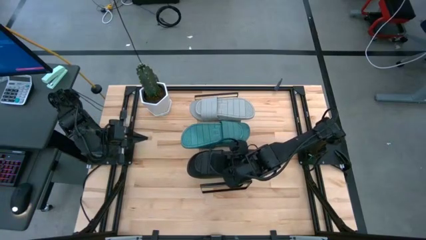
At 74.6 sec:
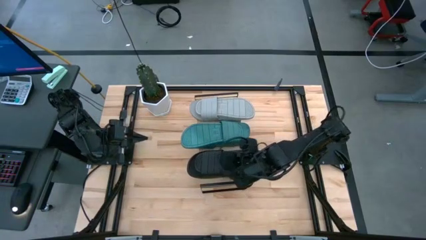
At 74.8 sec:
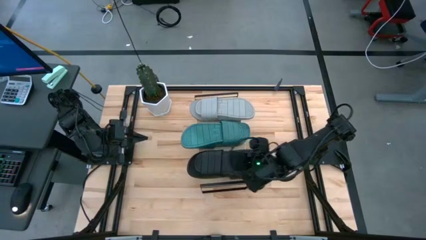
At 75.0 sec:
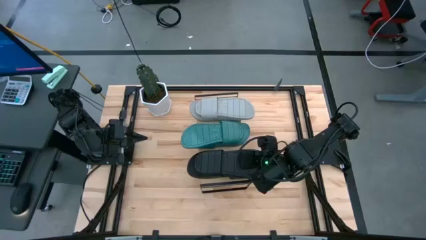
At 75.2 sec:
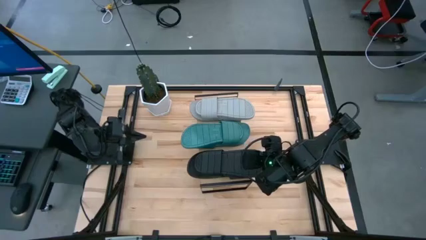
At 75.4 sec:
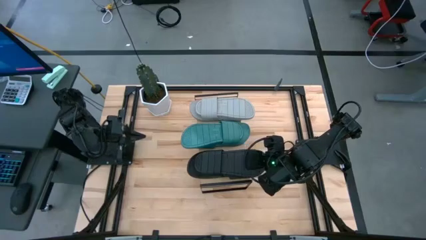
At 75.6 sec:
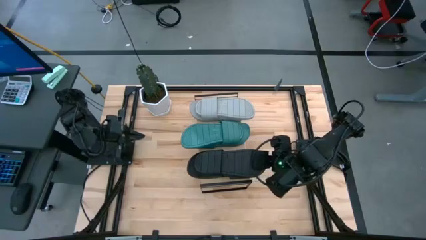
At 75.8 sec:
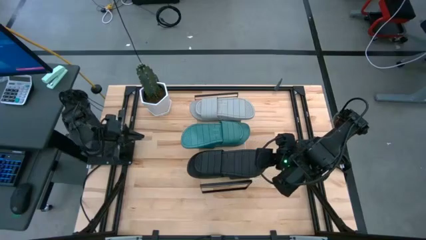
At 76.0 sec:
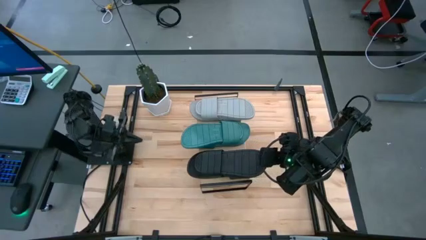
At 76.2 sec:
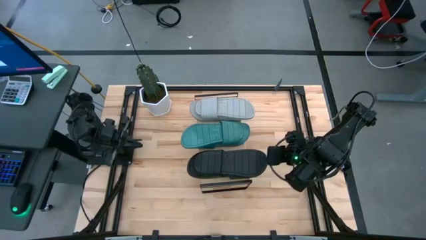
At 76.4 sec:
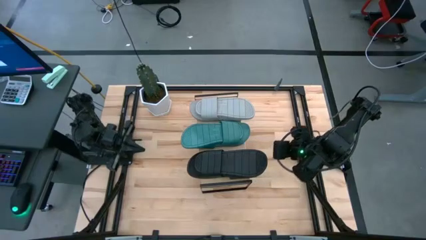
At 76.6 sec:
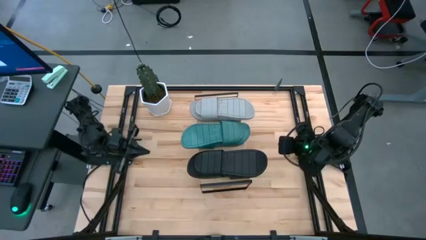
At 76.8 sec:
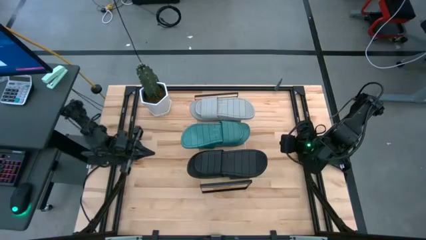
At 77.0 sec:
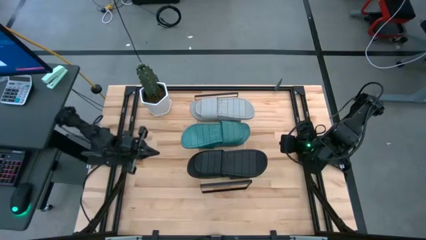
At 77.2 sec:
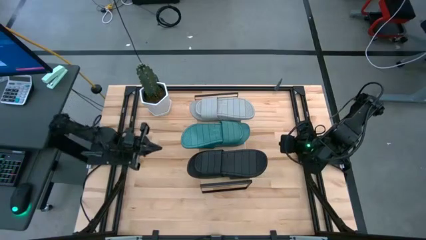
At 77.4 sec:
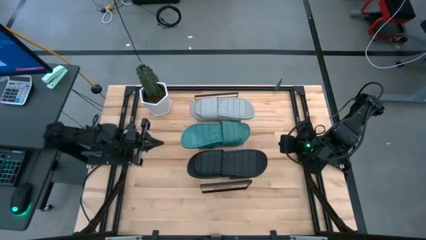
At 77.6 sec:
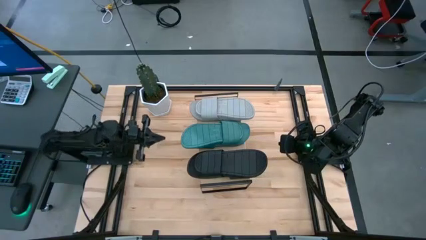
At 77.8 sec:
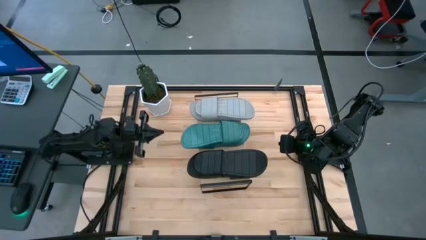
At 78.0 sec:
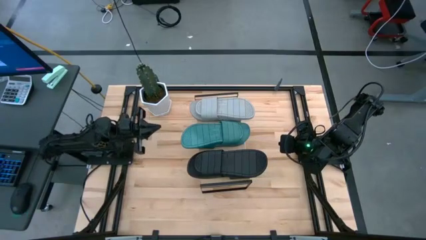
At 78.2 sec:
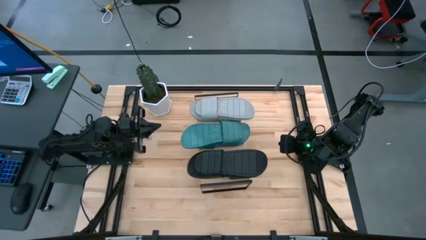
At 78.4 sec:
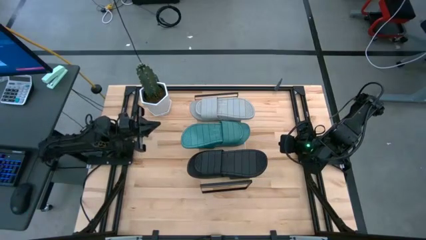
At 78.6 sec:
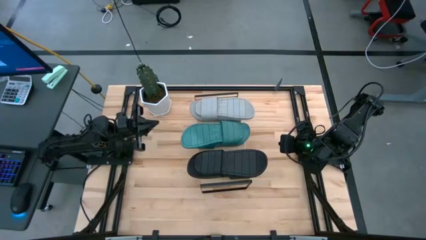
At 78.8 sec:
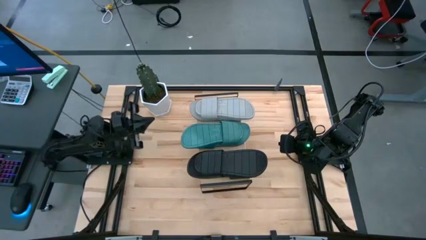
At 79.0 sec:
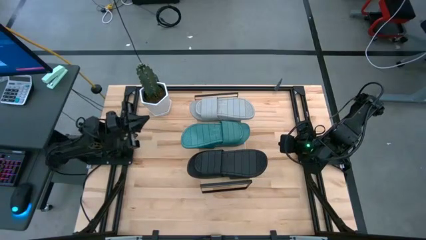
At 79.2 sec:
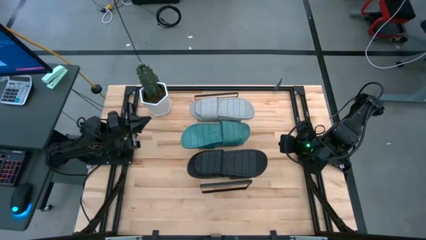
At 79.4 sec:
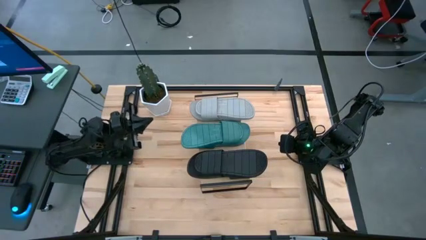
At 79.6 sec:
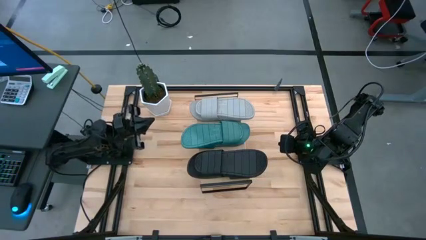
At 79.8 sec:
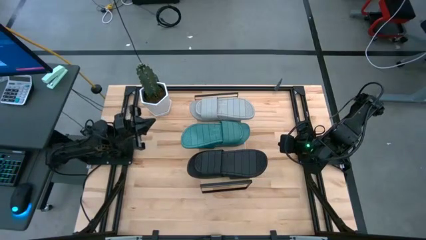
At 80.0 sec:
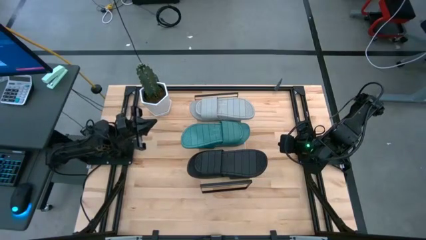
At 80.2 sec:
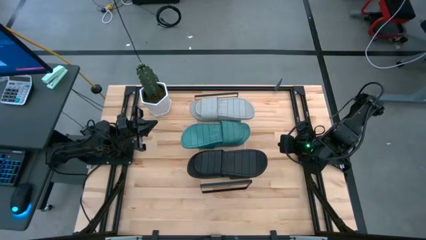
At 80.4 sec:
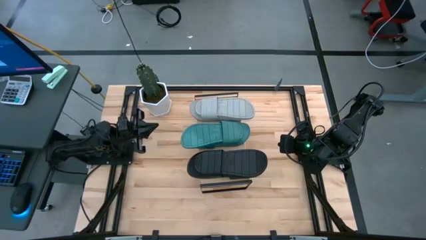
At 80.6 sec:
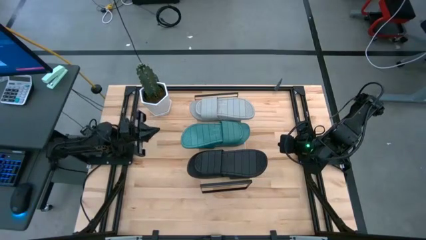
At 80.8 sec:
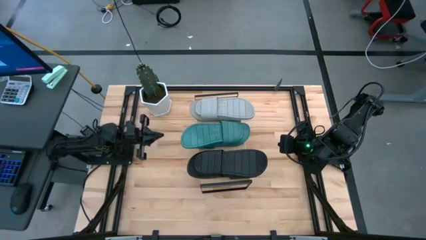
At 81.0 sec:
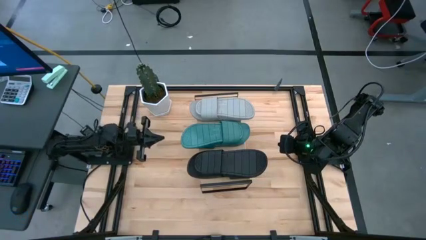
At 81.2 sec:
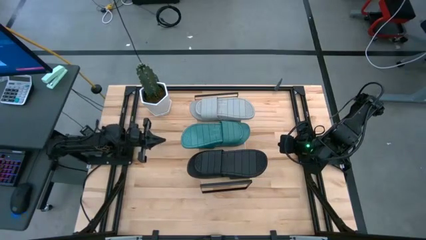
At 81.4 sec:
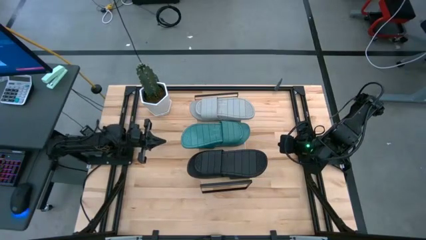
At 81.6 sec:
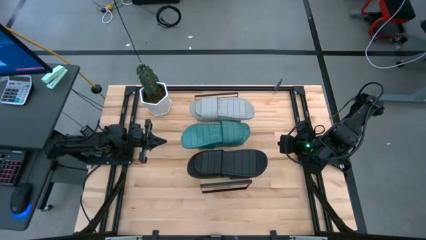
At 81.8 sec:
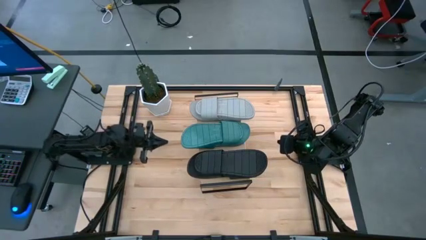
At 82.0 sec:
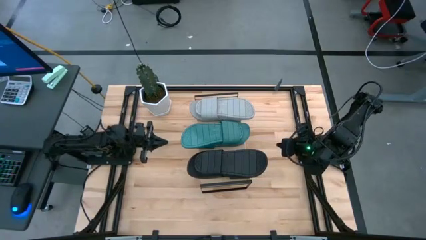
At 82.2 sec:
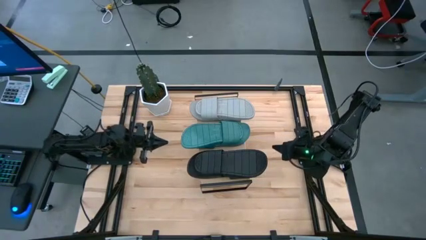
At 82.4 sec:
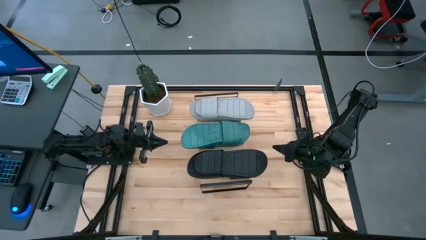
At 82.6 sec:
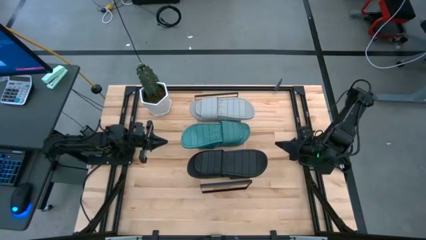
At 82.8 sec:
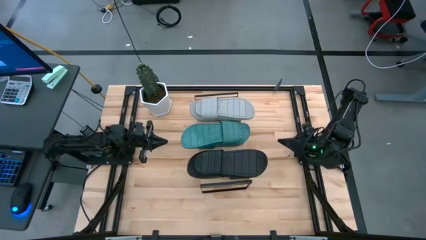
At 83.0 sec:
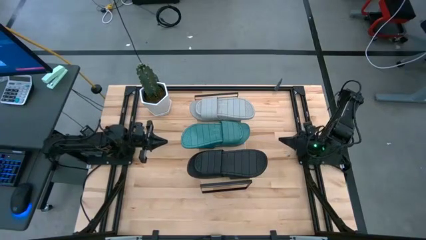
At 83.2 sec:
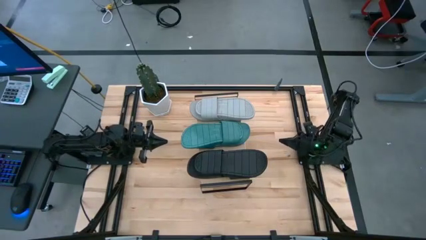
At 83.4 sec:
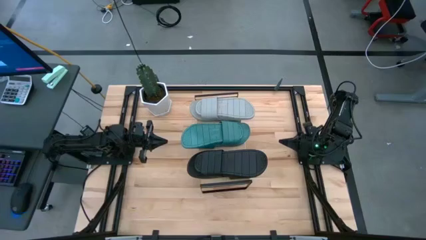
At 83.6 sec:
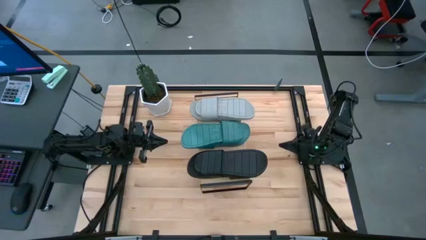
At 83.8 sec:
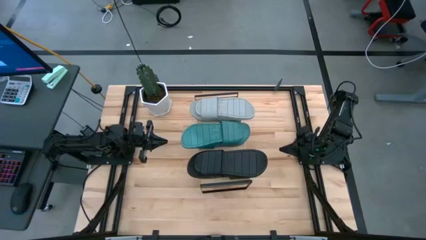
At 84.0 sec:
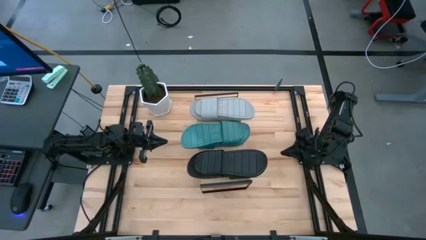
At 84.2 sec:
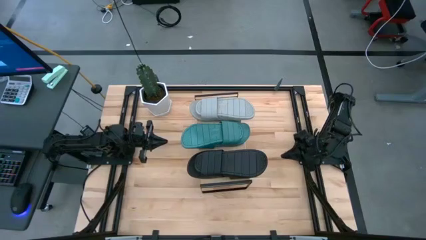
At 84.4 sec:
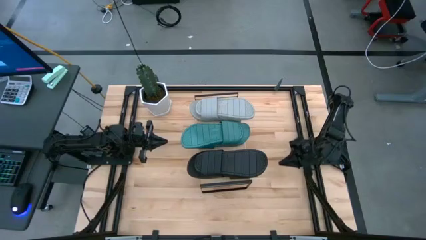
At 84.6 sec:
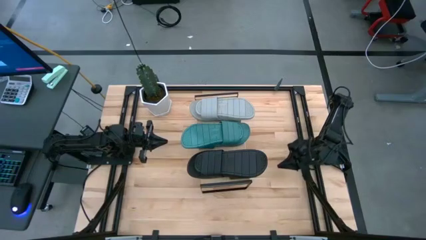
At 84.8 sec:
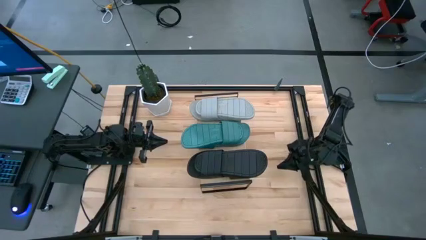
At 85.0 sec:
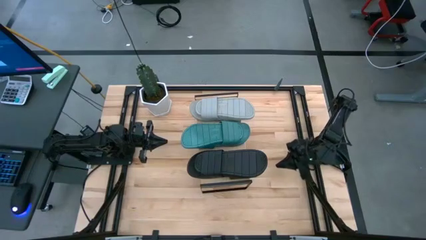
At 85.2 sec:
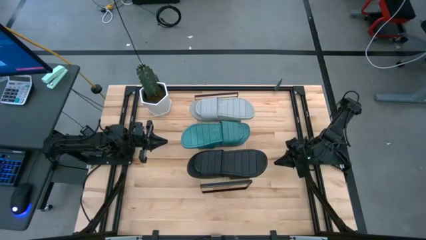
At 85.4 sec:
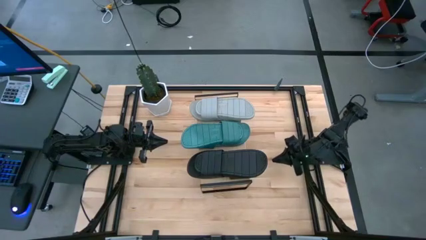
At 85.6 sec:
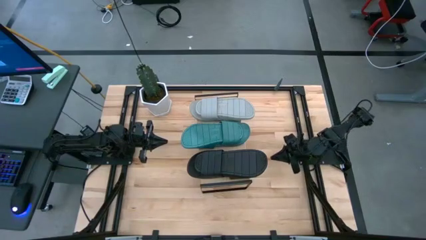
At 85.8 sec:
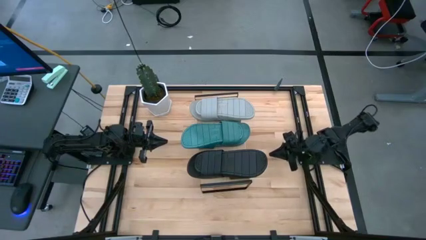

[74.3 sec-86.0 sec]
Task: Pick and place slippers onto the shelf
Return to Home Position

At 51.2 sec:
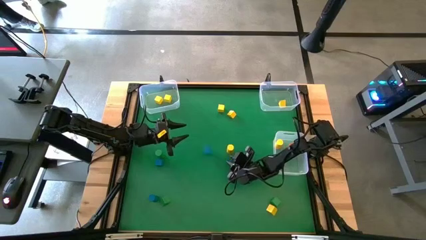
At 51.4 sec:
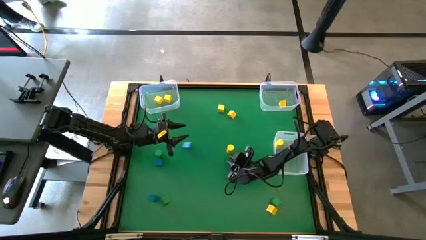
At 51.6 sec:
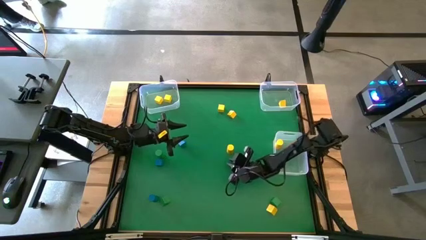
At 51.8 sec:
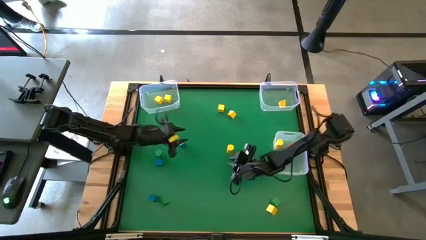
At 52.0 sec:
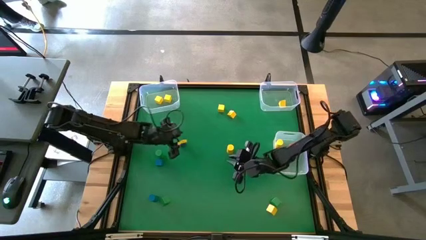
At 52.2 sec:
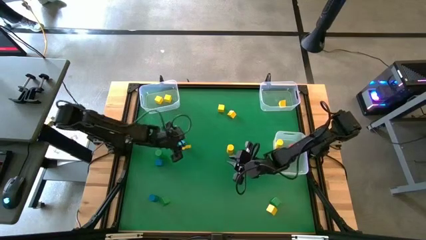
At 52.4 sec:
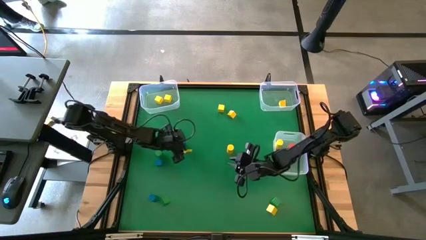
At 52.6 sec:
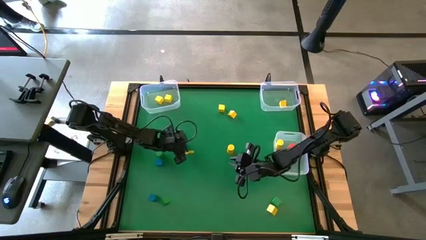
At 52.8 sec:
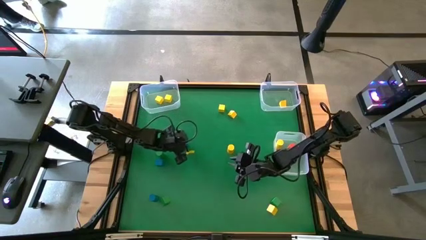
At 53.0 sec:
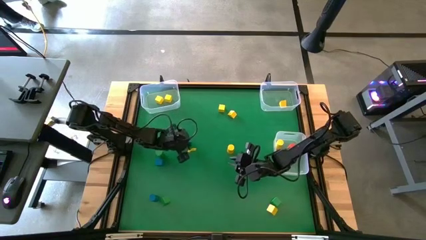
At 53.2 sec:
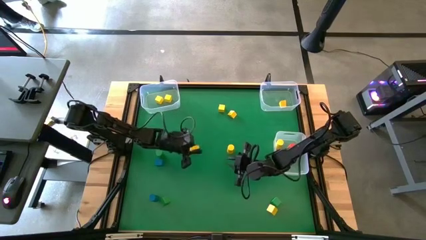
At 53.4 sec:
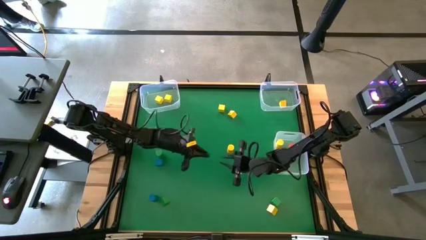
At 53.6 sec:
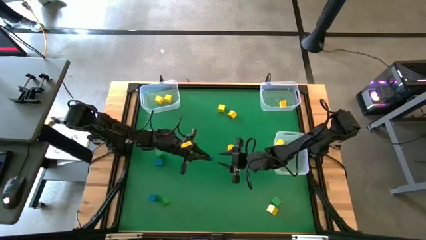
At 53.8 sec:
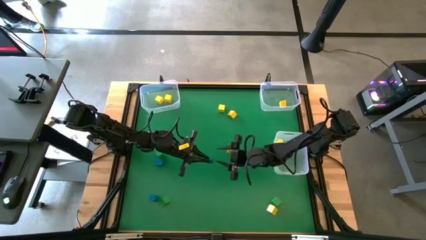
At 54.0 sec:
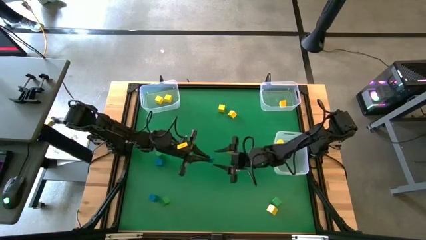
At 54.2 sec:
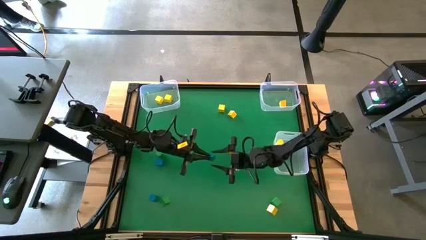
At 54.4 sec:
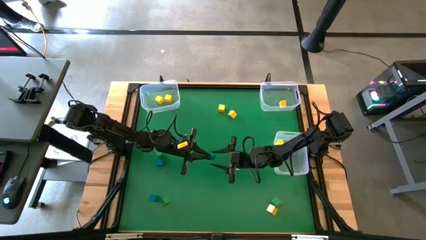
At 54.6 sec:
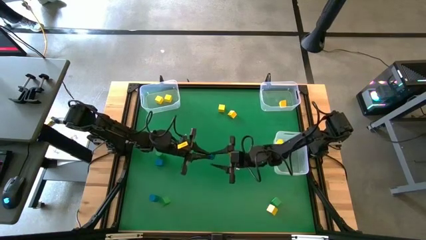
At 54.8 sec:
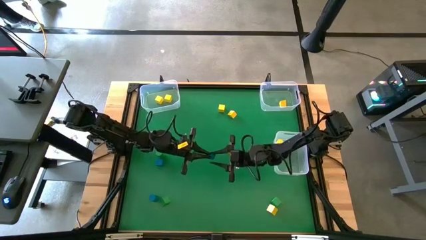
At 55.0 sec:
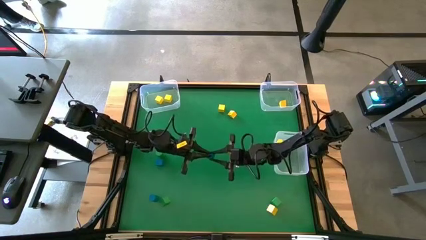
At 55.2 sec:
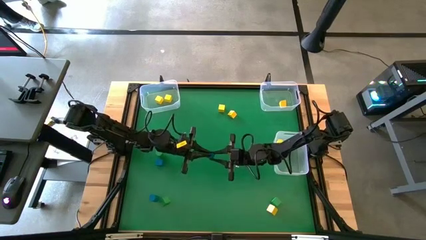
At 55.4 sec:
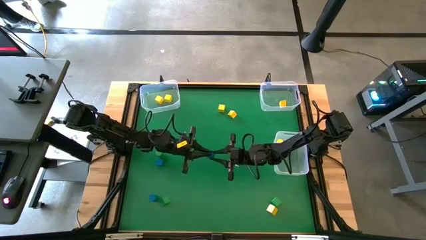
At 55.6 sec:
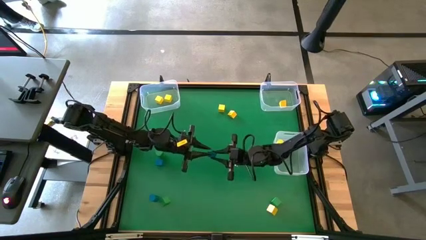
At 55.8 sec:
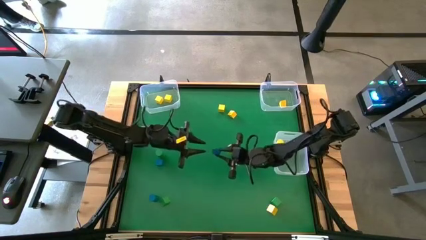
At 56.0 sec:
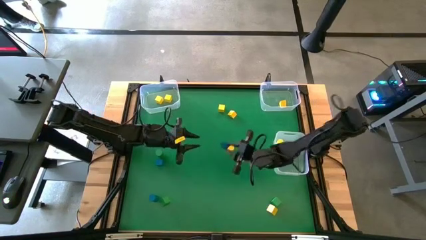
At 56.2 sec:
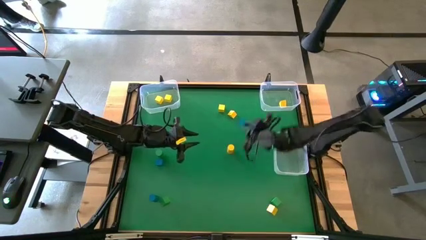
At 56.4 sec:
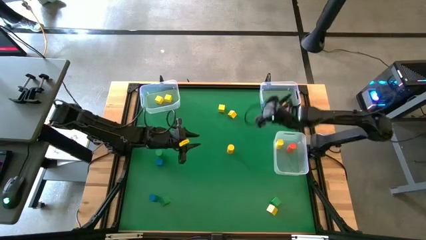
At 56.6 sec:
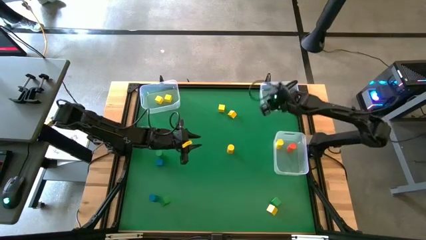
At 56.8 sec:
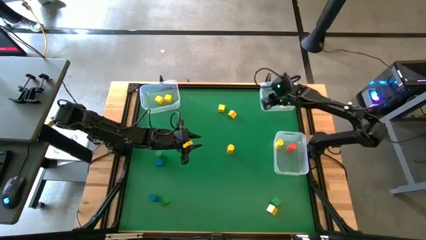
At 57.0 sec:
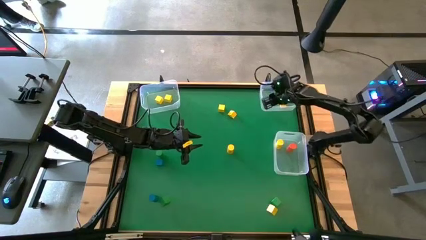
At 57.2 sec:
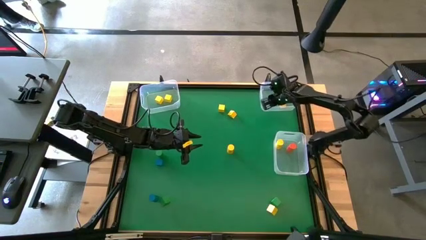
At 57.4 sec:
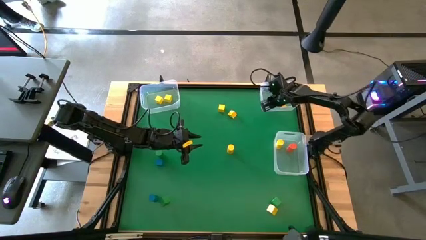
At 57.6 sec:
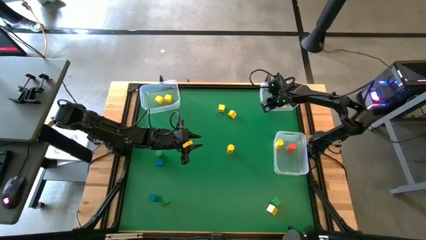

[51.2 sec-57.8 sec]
Task: Sort blocks by size
Put the blue triangular block into the top right transparent bin
